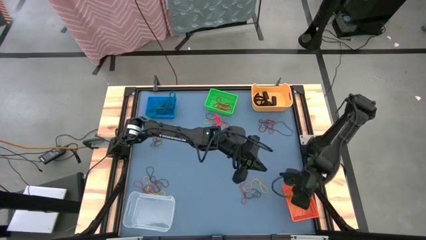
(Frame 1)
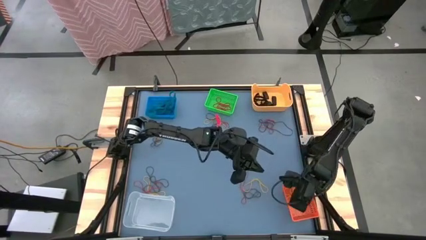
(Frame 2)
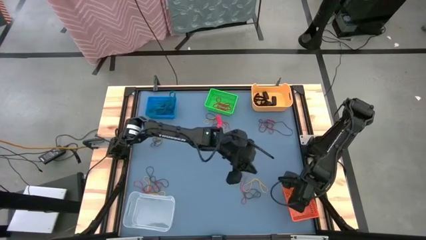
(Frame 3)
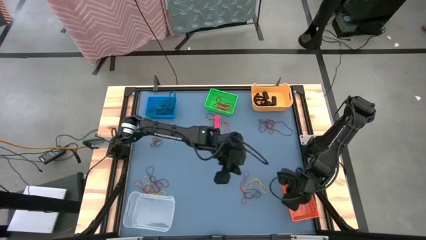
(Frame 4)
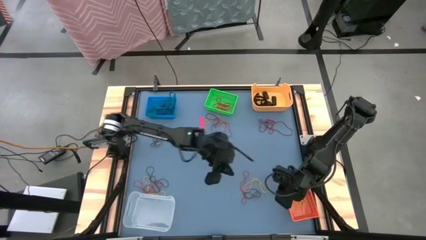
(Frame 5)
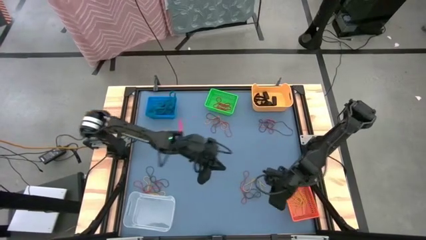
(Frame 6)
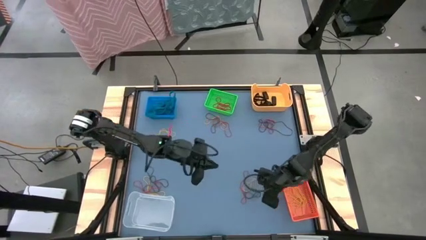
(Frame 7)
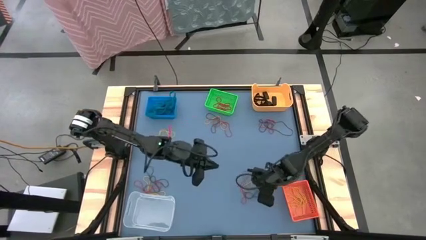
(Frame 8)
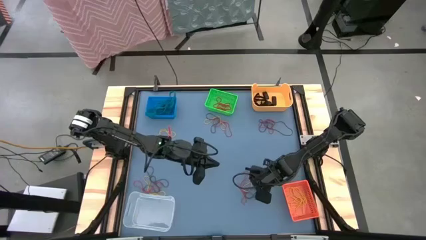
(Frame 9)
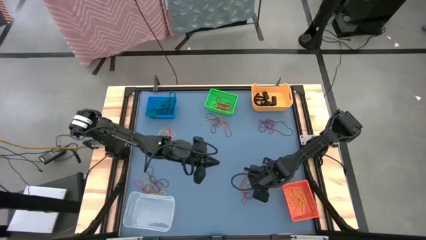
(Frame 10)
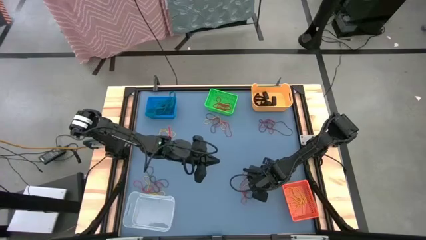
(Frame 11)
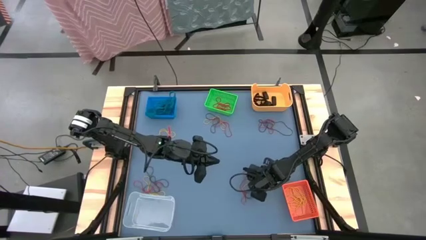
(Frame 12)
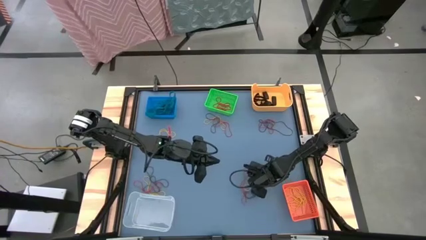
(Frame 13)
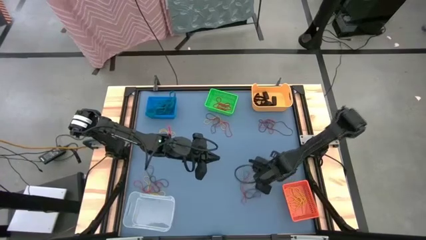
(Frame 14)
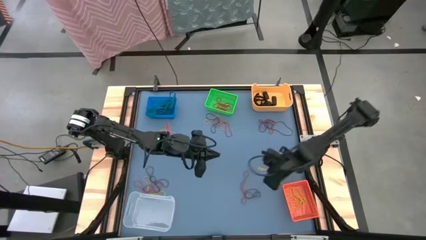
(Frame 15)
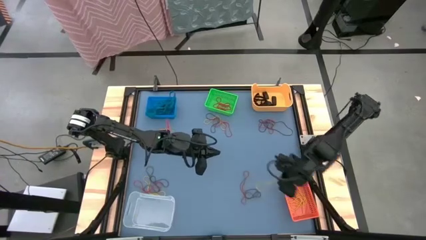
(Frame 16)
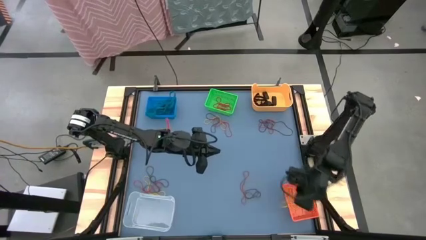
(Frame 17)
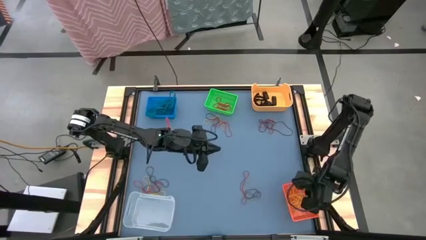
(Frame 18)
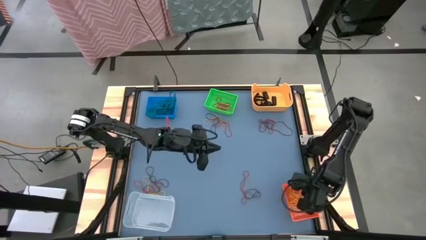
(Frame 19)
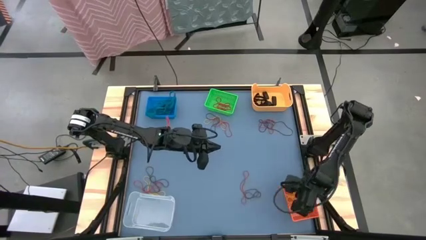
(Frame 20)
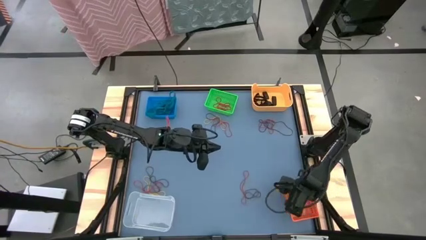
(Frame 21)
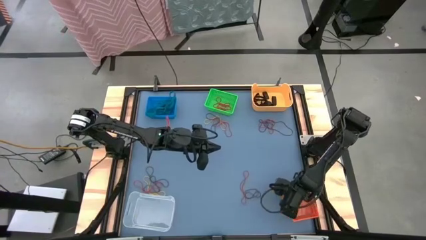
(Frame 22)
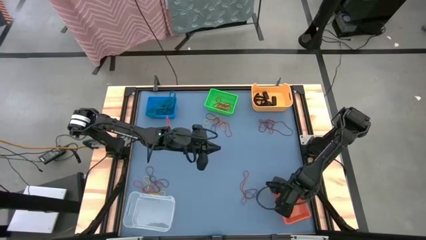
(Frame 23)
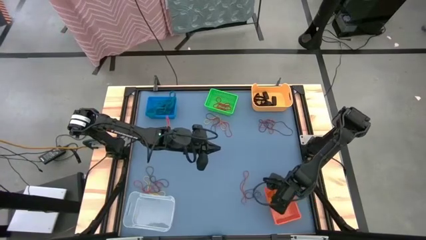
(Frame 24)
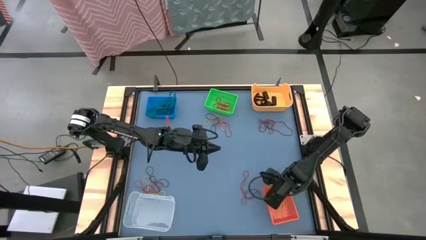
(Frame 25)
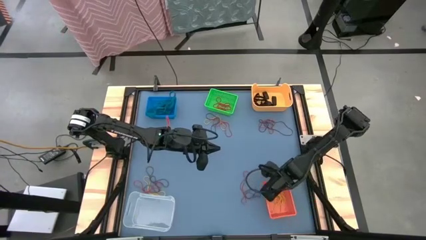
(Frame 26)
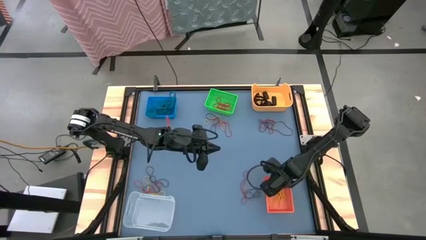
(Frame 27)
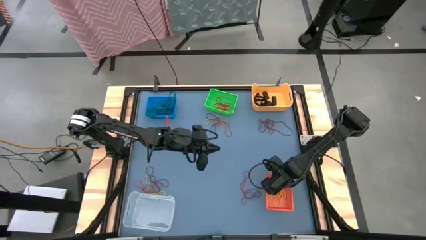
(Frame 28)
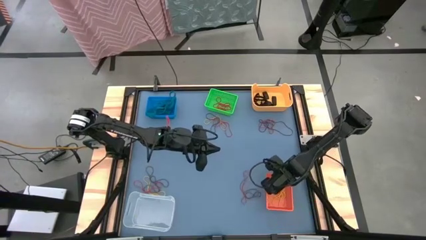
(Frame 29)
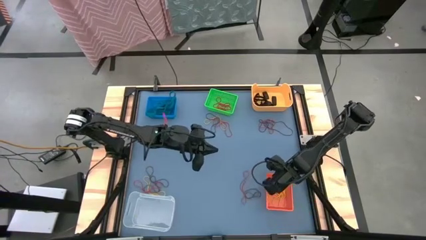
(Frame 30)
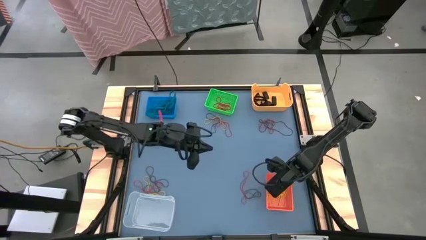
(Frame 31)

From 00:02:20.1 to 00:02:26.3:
Task: Sort rubber bands into baskets
Put the yellow rubber band into the orange bin

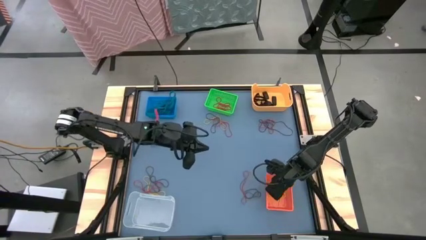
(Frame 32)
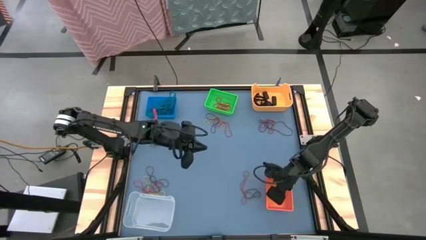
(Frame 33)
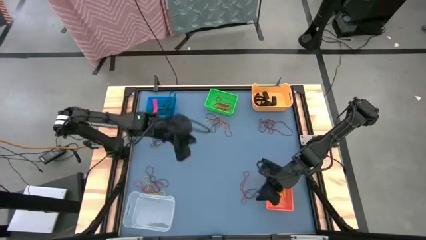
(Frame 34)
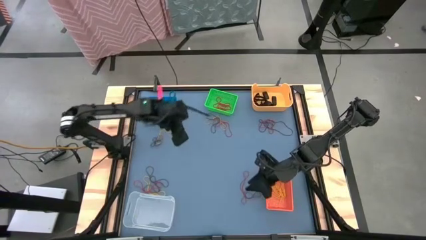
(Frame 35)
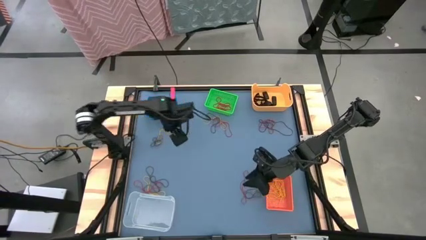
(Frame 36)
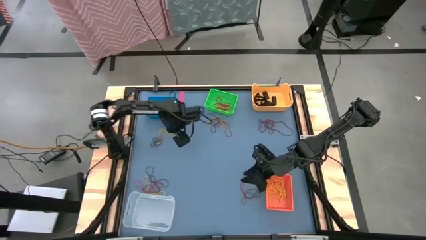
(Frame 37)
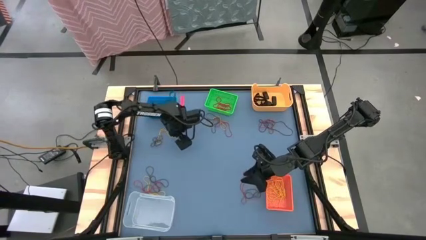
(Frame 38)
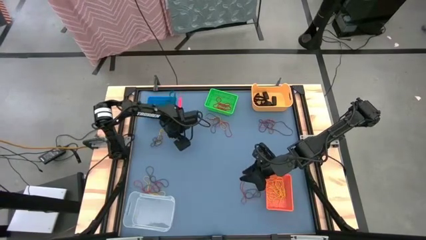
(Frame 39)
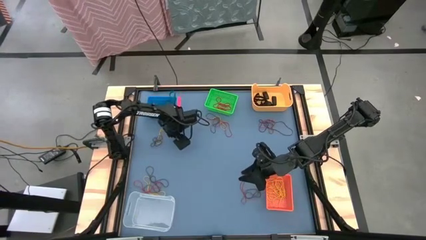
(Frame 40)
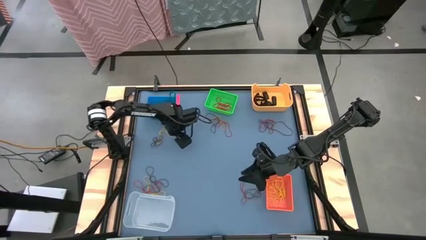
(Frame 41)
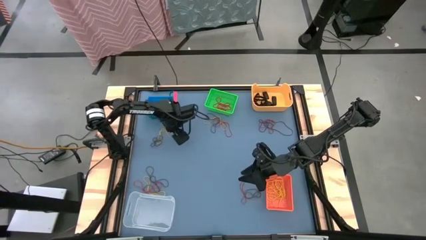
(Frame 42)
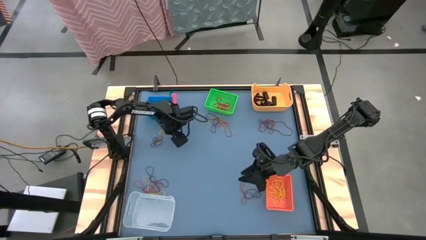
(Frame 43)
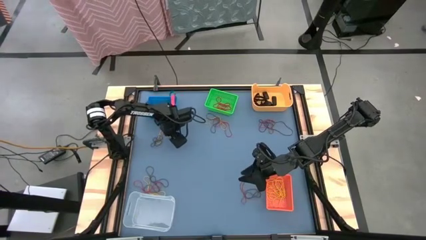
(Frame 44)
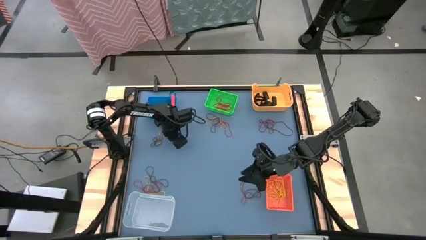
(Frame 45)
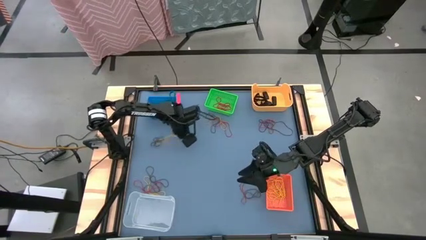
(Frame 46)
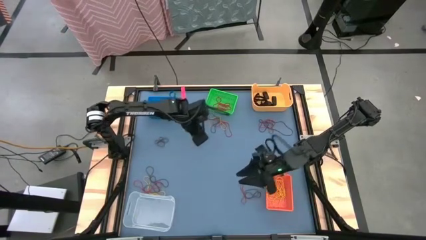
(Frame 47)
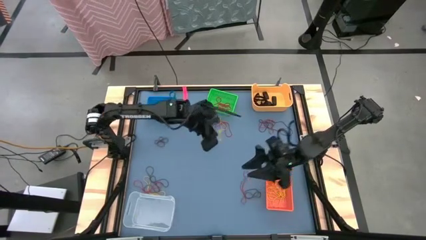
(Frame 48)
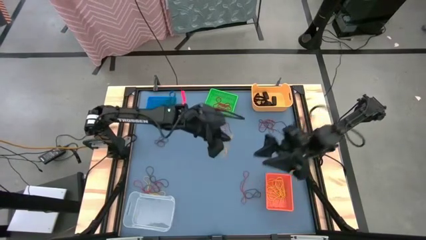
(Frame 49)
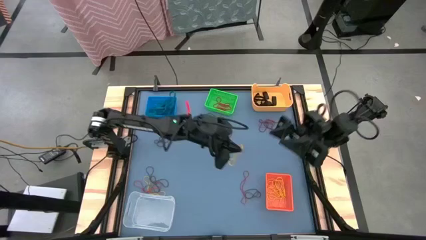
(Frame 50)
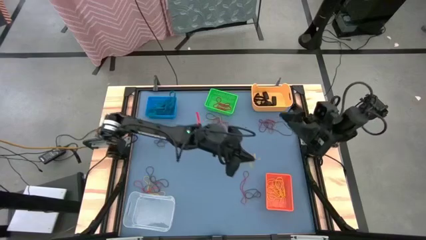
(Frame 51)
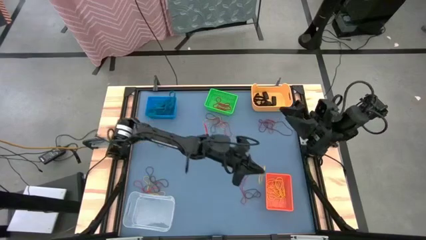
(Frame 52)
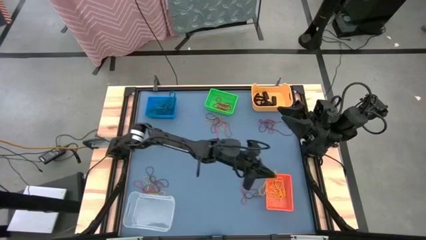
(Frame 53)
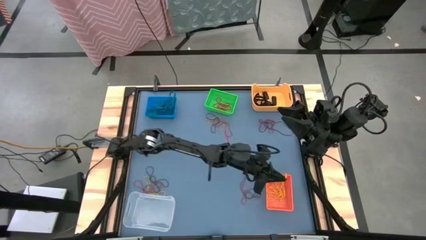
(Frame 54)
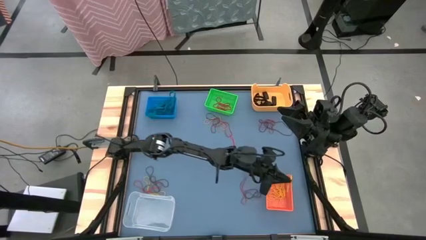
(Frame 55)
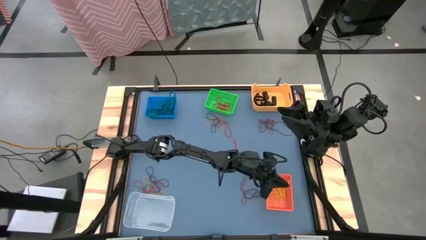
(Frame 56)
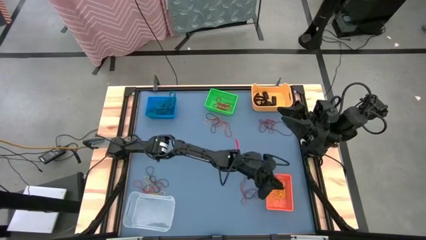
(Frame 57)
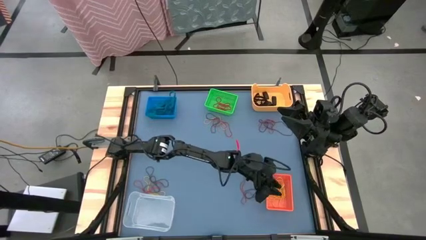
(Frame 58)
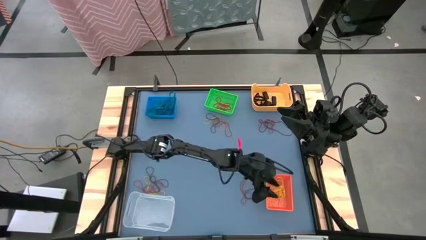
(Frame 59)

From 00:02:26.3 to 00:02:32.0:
Put the yellow rubber band into the orange bin

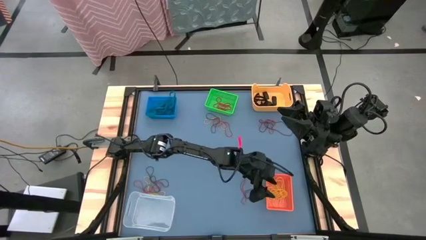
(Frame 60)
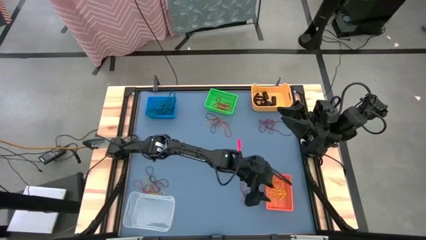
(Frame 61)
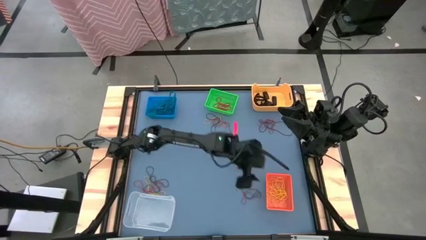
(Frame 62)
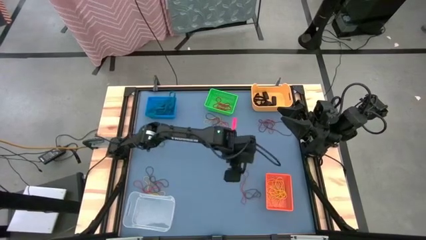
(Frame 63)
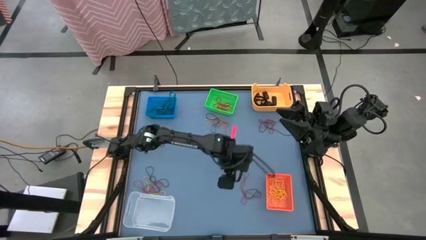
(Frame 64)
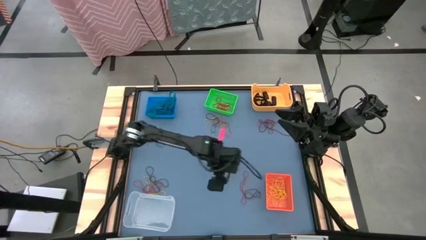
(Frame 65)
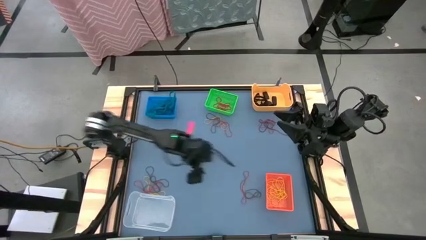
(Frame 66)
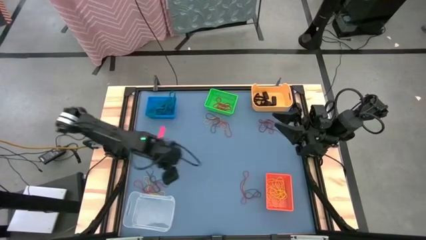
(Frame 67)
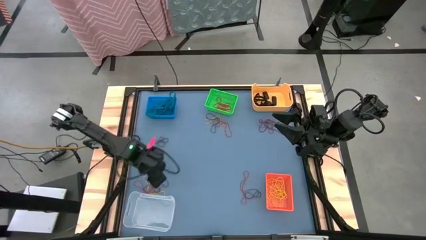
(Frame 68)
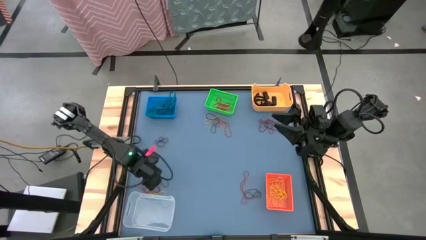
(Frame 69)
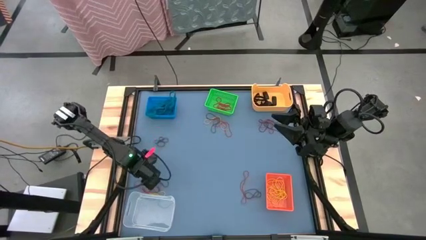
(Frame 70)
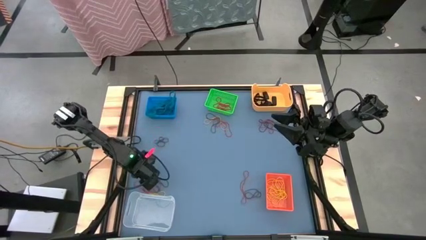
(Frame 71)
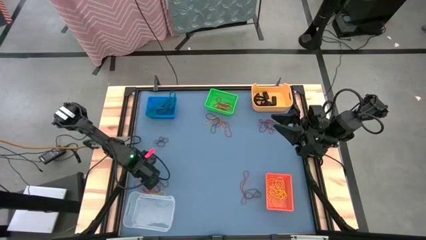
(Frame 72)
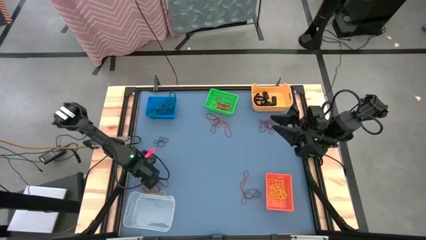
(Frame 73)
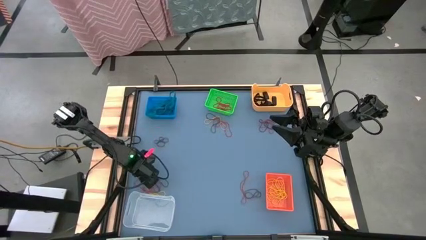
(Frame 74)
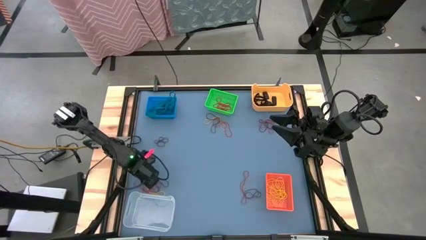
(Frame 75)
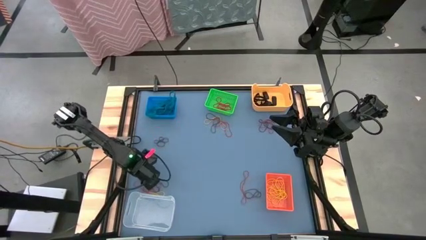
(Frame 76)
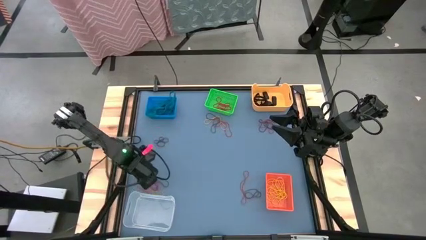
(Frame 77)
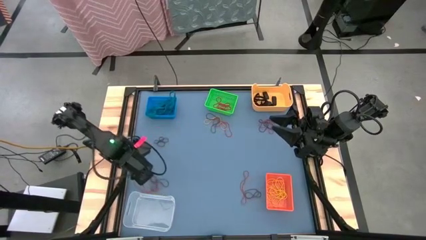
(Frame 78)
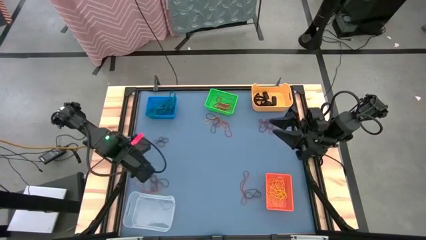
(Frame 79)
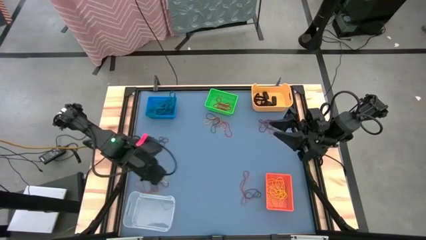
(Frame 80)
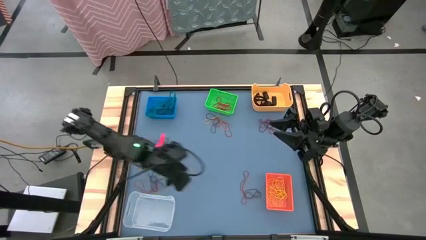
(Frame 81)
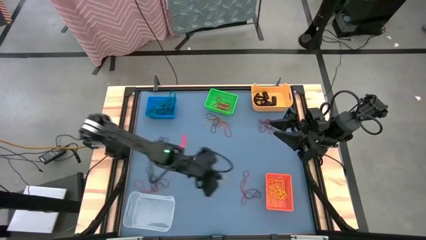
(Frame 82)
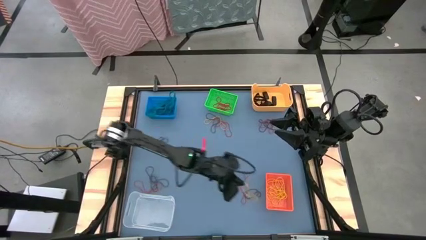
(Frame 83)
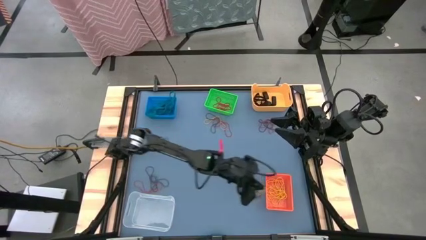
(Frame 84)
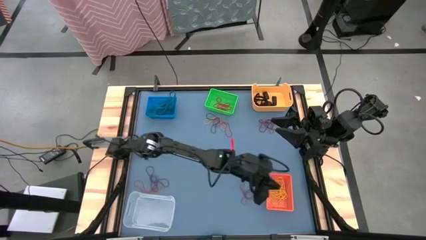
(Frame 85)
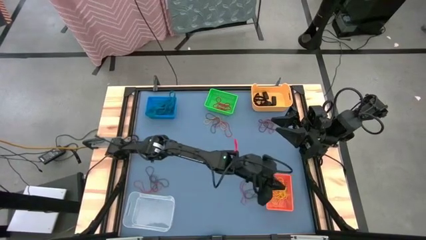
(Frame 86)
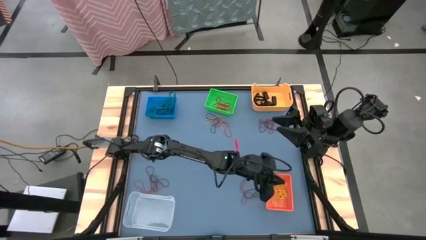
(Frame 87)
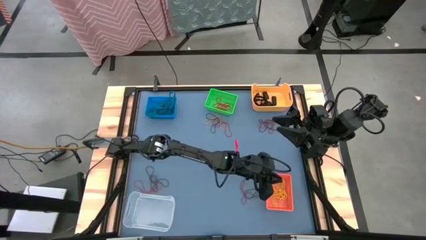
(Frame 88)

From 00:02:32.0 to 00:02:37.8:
Put the yellow rubber band into the orange bin
